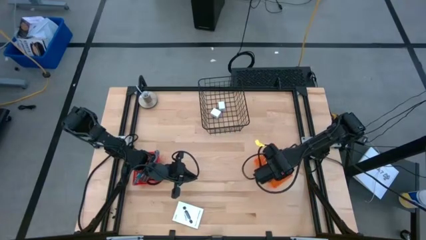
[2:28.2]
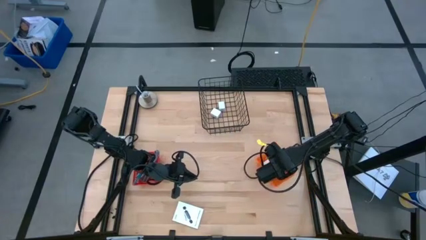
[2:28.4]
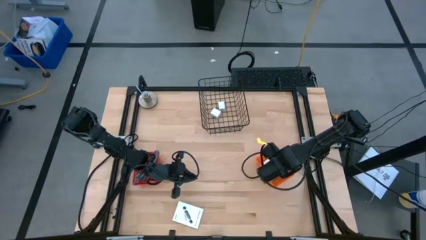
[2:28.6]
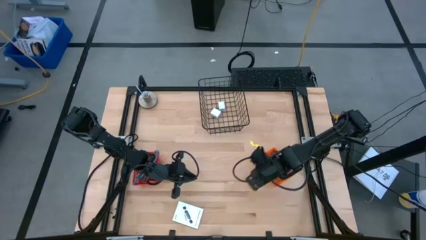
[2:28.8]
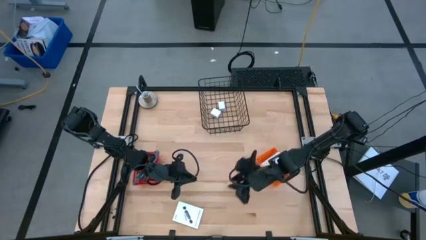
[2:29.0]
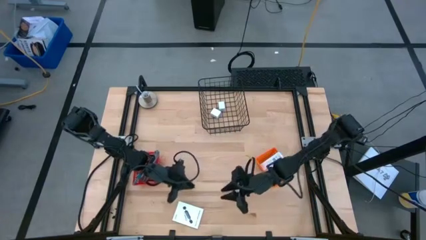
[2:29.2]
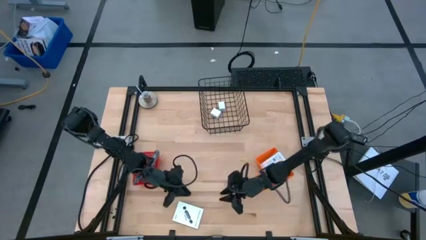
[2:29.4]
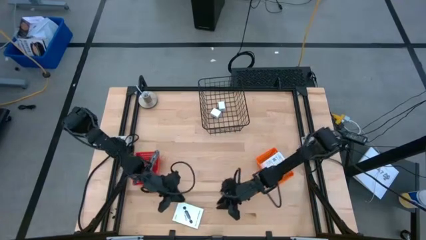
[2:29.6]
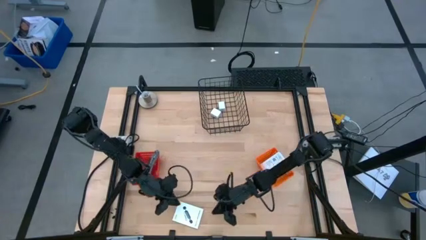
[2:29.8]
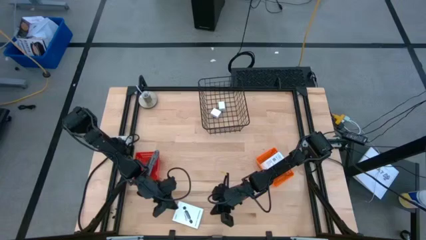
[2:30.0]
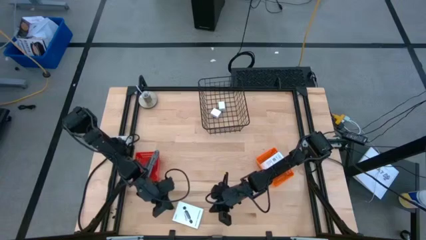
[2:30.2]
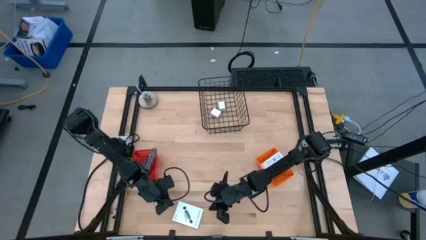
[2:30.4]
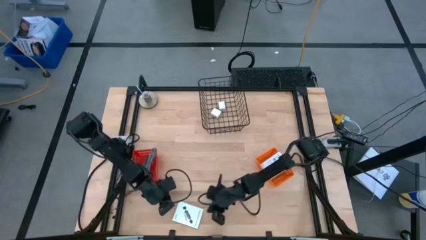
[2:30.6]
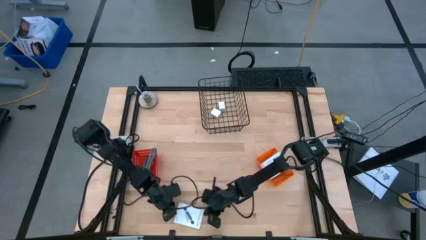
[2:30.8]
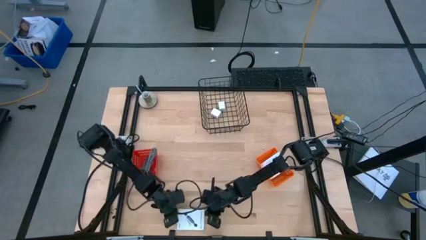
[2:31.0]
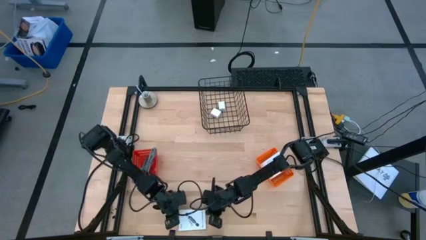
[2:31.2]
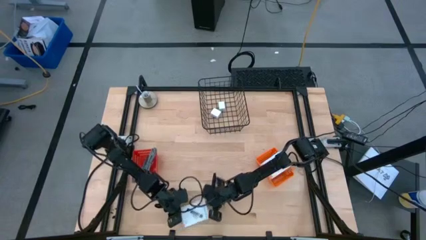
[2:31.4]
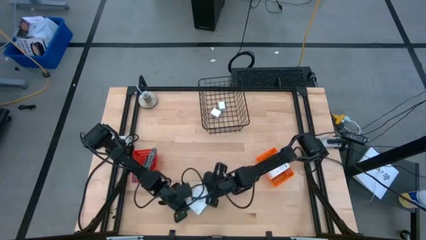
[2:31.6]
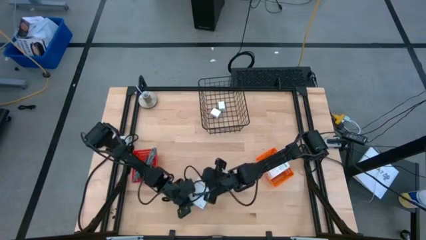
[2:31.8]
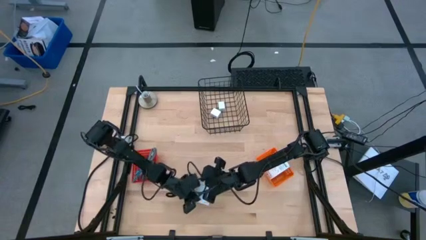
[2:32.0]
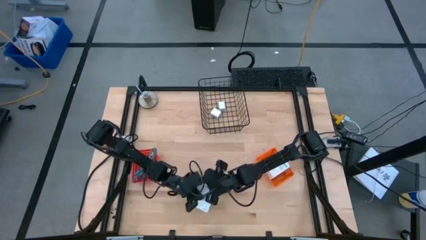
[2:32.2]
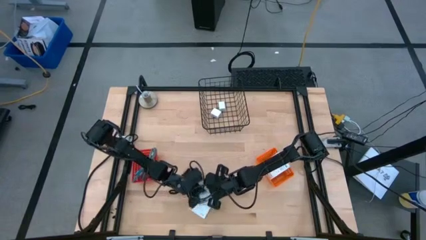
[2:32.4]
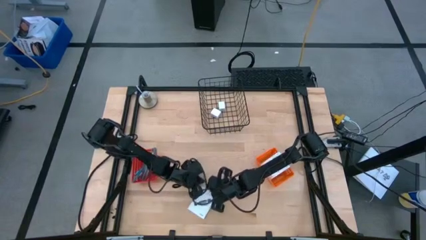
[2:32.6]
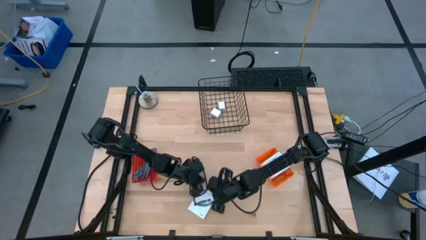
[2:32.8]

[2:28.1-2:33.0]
Task: Pick and place items into bin
Put the card reader box into the orange basket

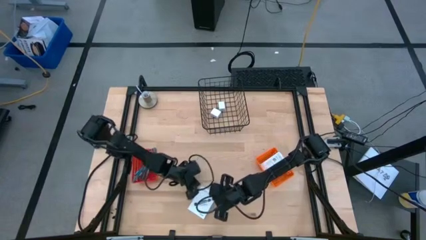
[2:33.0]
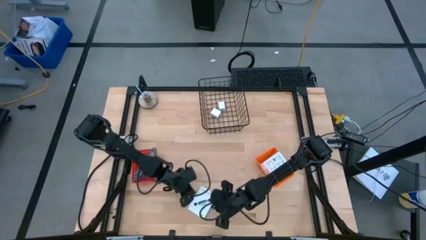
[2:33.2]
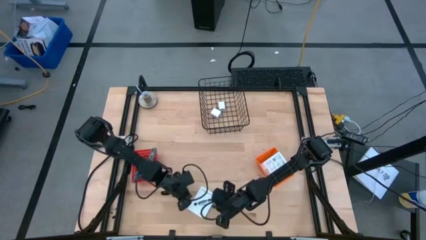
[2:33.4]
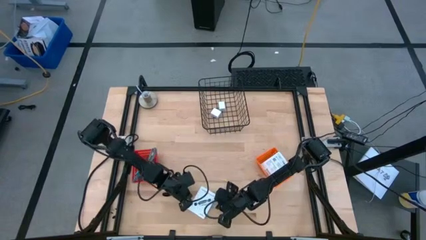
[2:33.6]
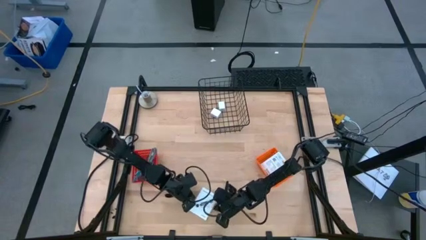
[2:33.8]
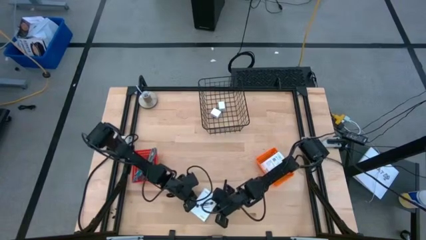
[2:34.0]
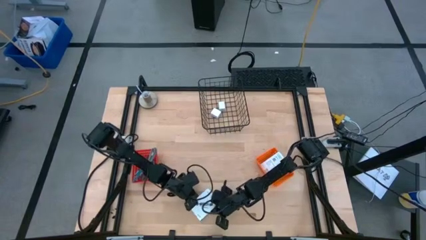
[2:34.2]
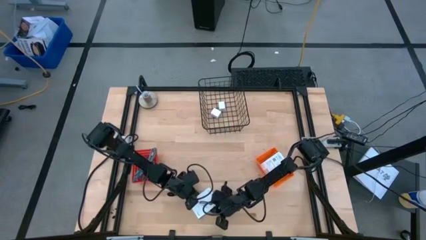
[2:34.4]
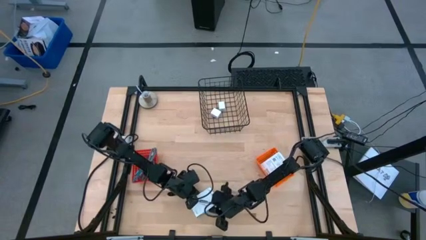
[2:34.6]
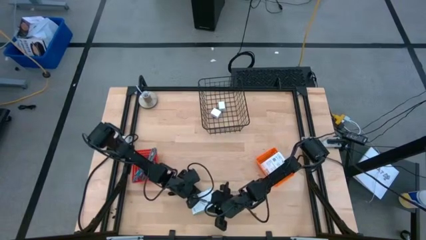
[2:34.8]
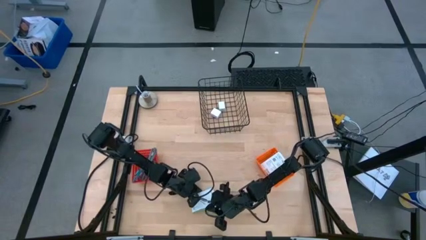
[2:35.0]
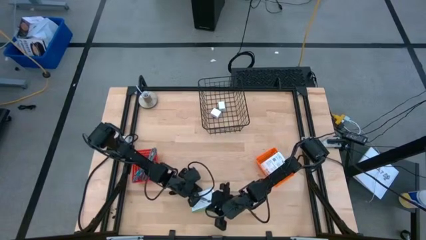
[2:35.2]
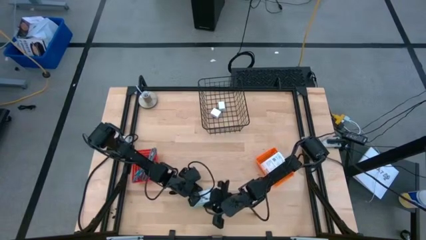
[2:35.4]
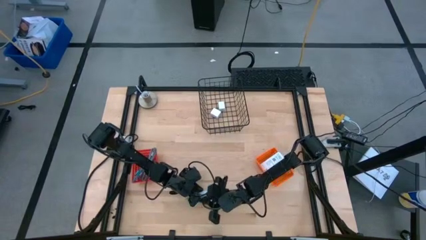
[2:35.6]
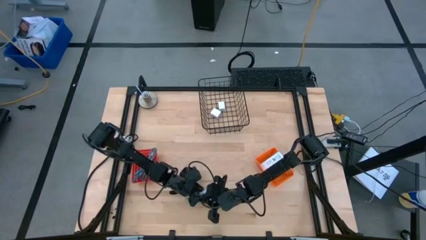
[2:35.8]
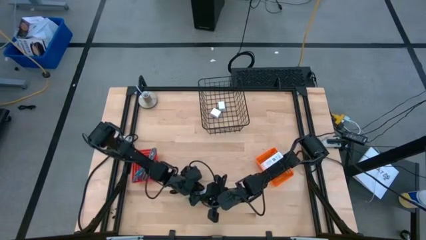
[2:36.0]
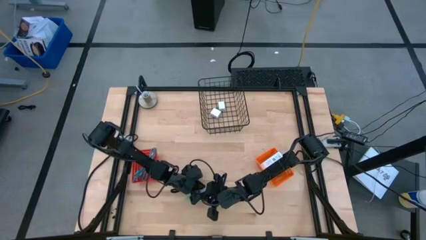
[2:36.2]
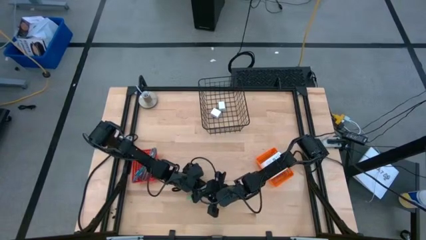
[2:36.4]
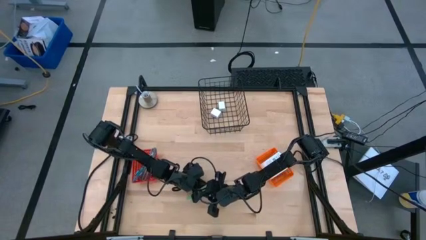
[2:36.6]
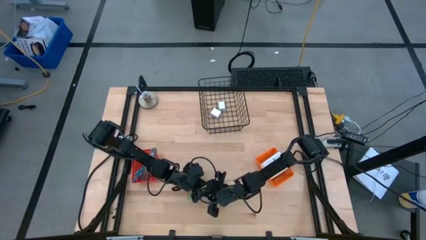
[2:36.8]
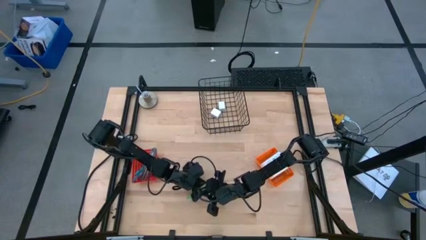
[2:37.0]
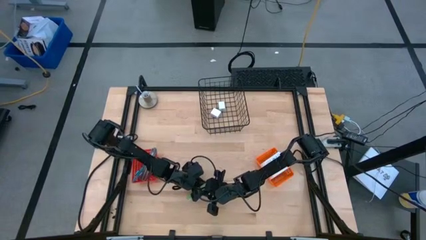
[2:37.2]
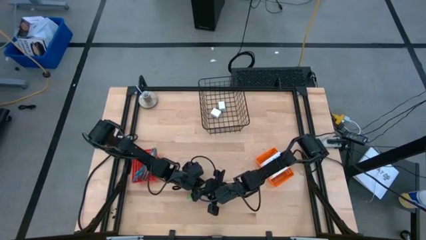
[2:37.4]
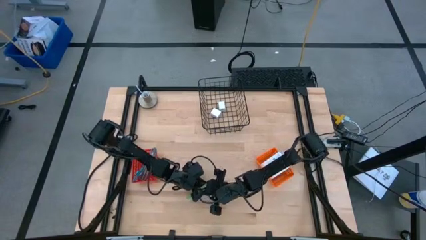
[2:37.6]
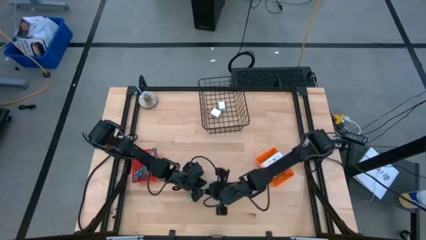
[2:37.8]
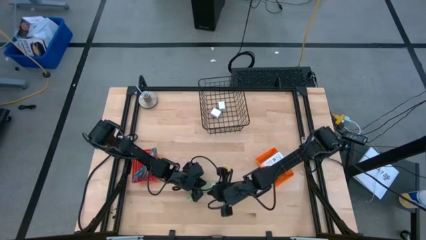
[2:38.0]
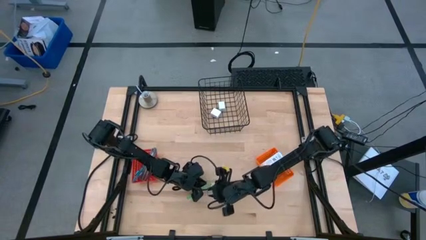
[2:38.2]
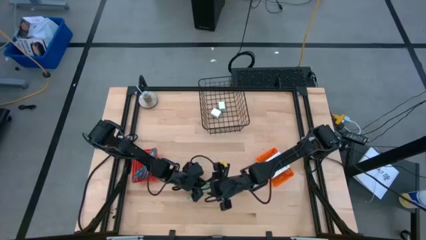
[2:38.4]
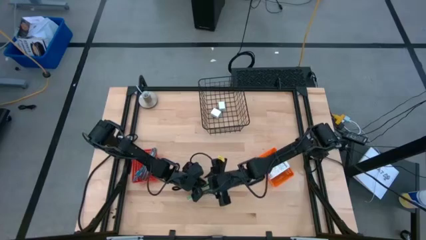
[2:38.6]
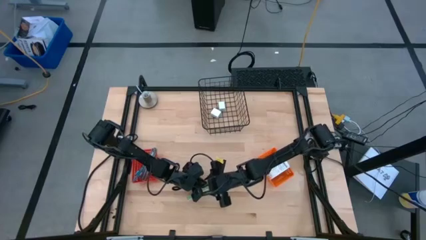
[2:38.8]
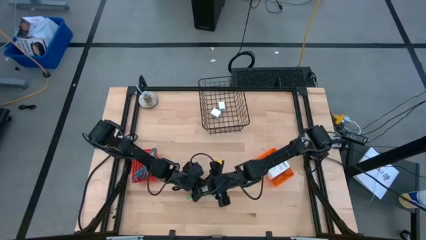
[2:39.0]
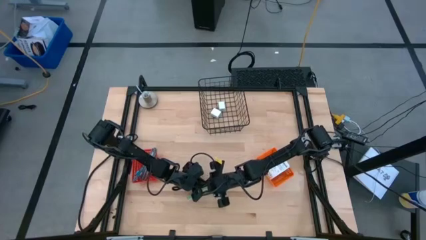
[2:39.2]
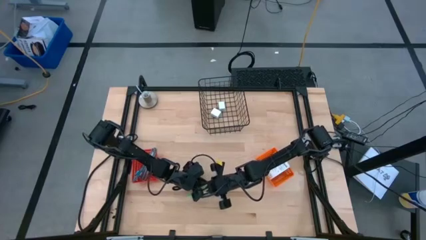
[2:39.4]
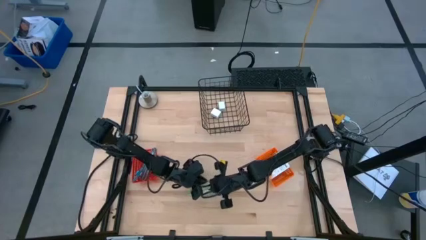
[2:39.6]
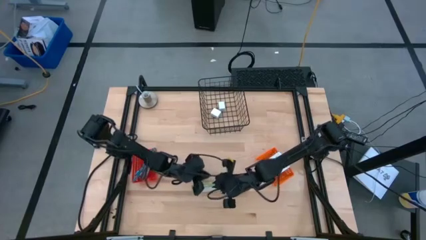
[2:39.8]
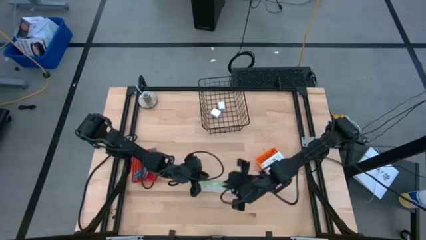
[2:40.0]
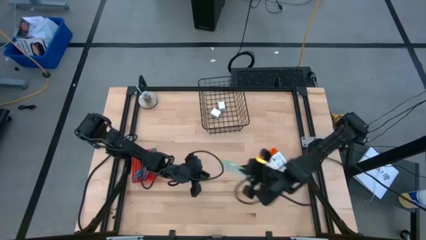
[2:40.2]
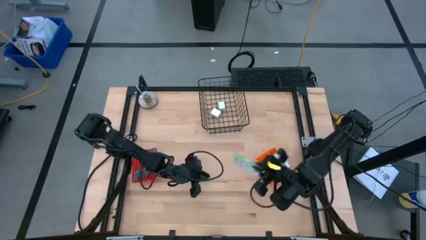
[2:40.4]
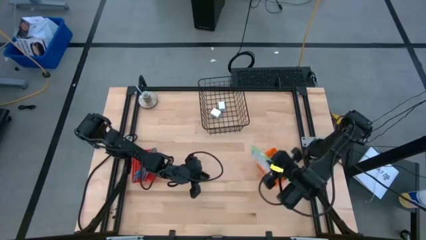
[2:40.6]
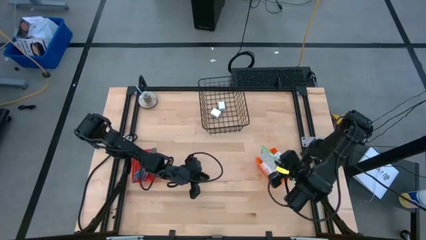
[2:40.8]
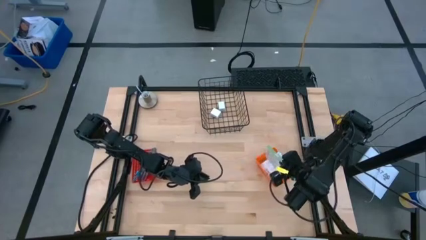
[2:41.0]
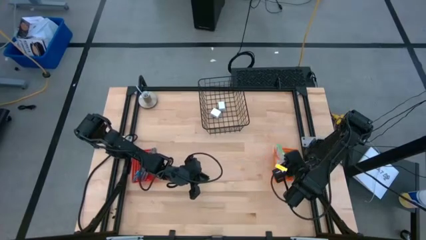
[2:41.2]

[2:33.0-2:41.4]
Put the card reader box into the orange basket
